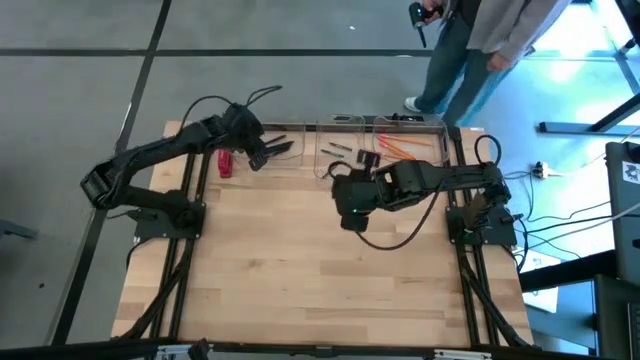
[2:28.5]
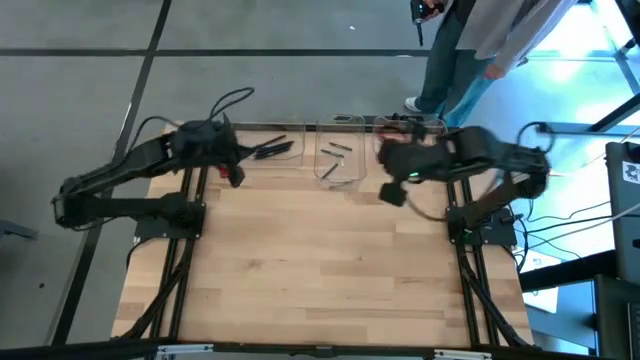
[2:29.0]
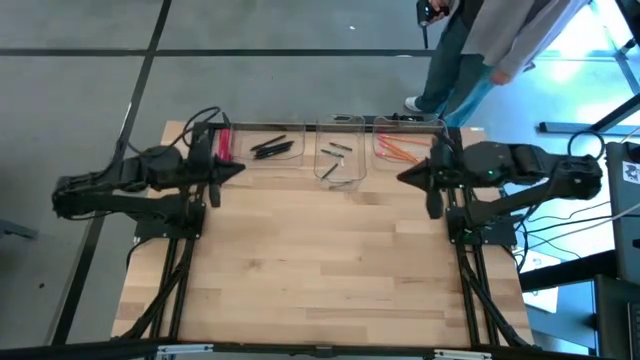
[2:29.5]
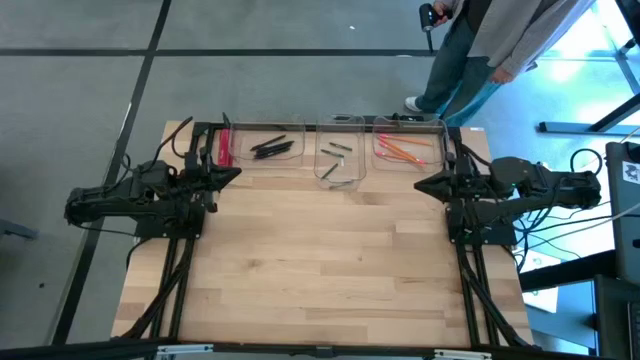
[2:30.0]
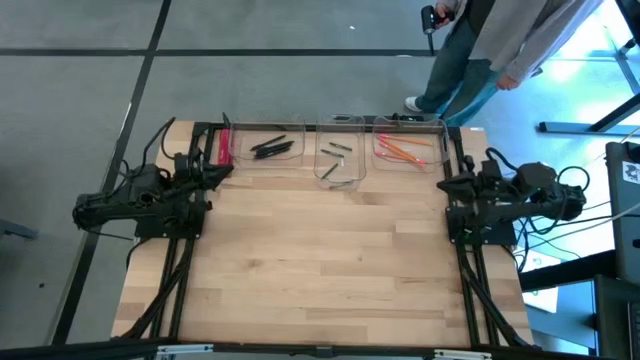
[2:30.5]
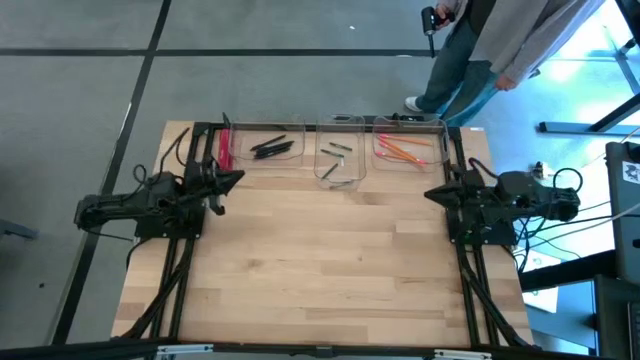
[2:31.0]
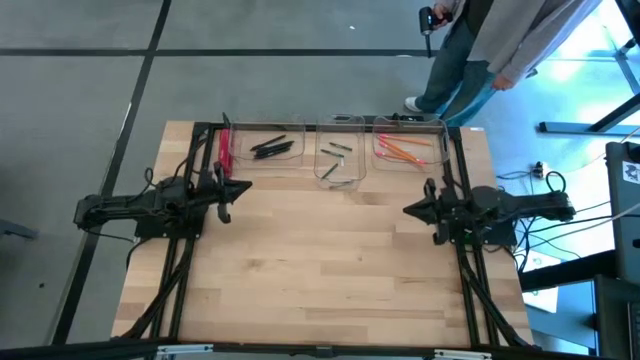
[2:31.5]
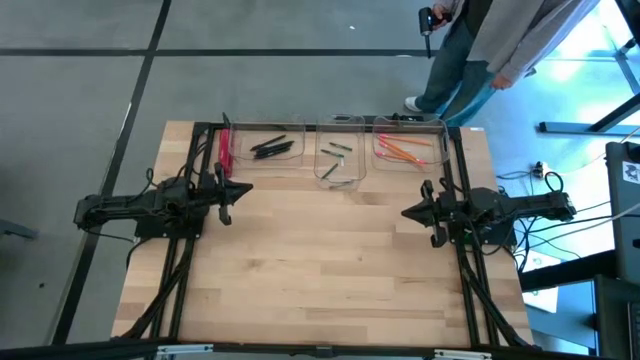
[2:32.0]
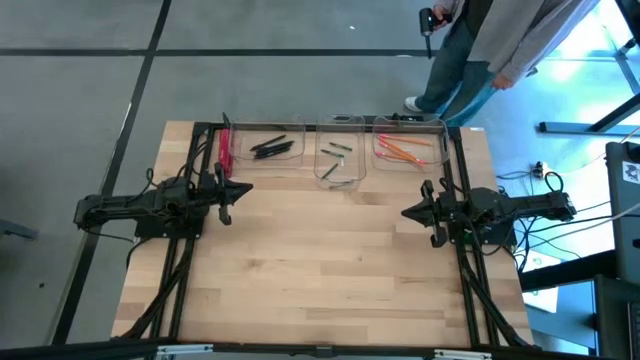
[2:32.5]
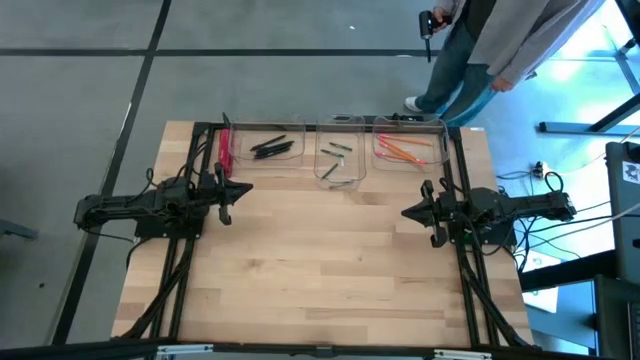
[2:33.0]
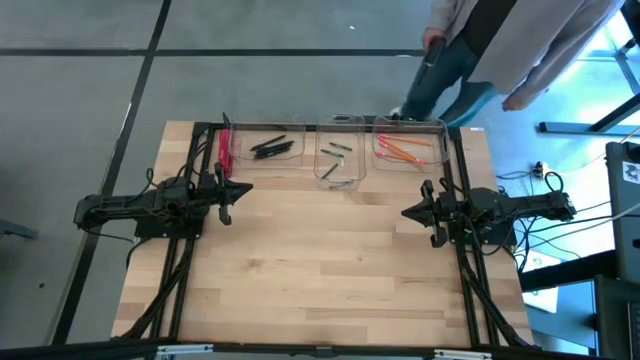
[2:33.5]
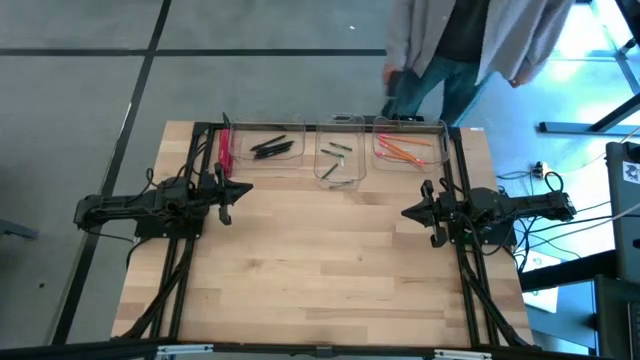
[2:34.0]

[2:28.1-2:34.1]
Task: Sort crayons/erasers/pens/pencils in bins
Return to Home Position

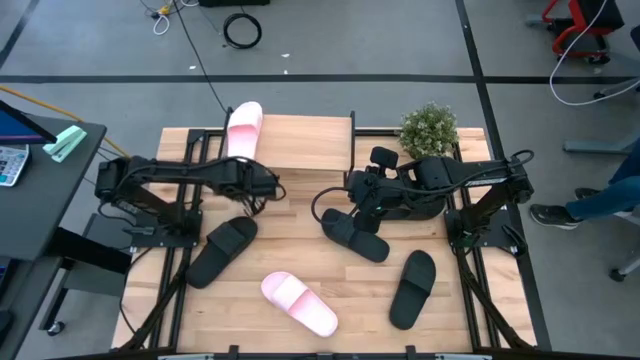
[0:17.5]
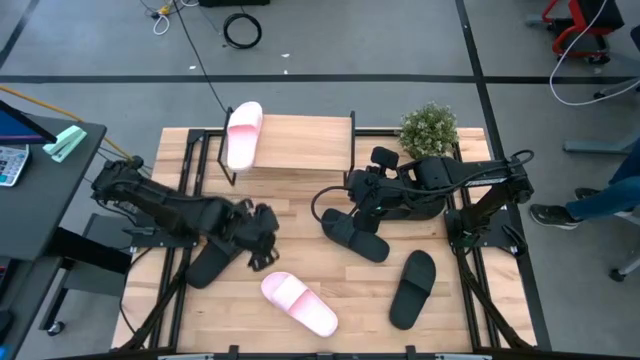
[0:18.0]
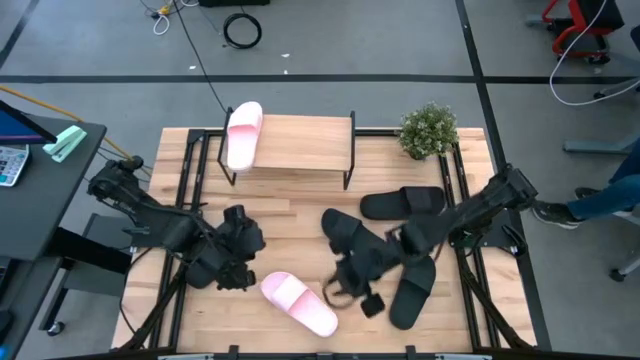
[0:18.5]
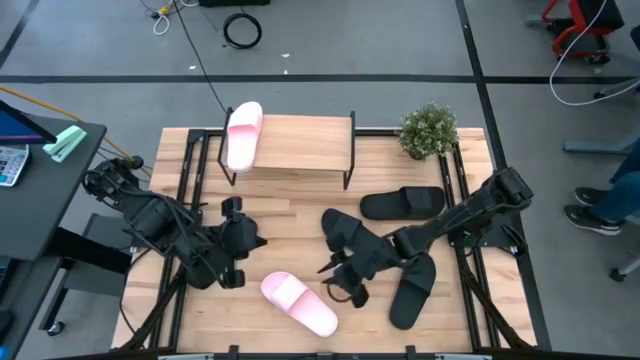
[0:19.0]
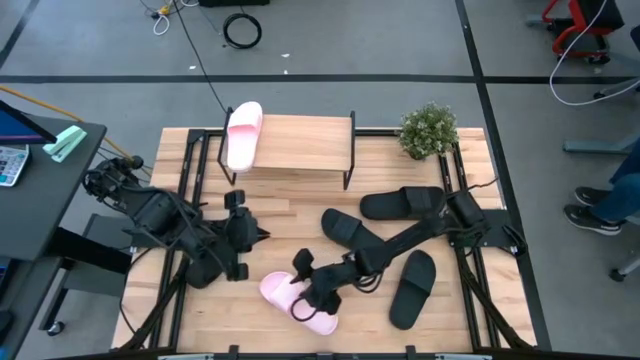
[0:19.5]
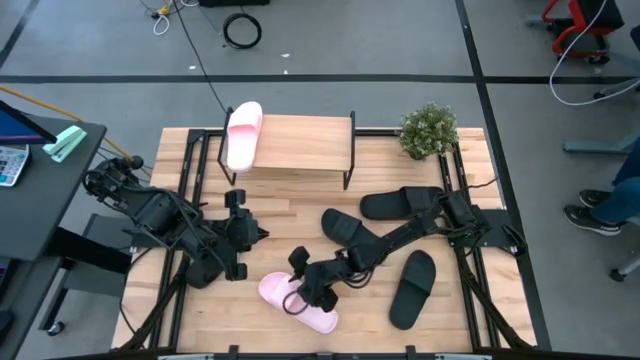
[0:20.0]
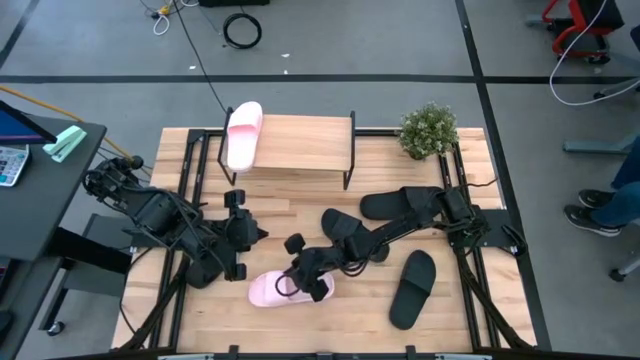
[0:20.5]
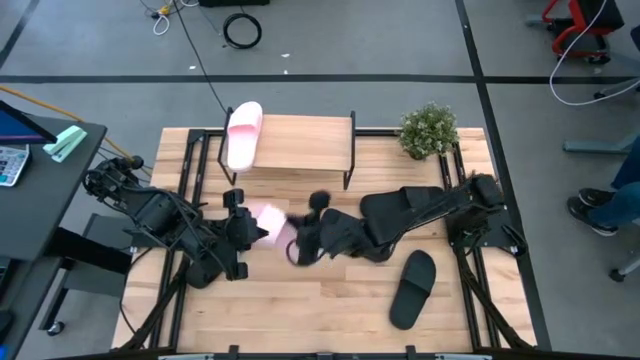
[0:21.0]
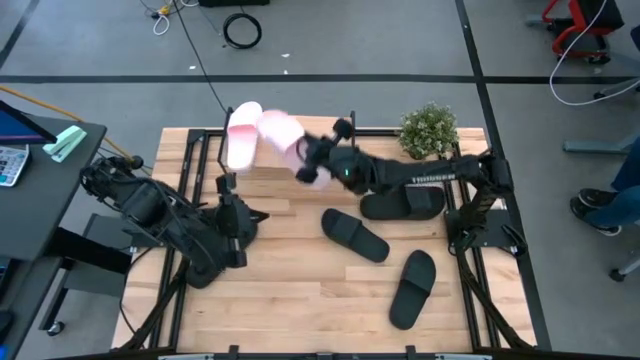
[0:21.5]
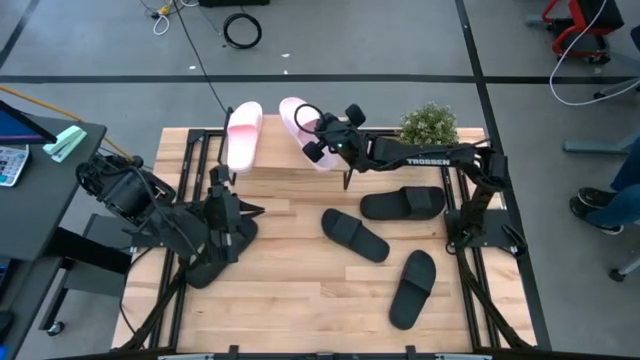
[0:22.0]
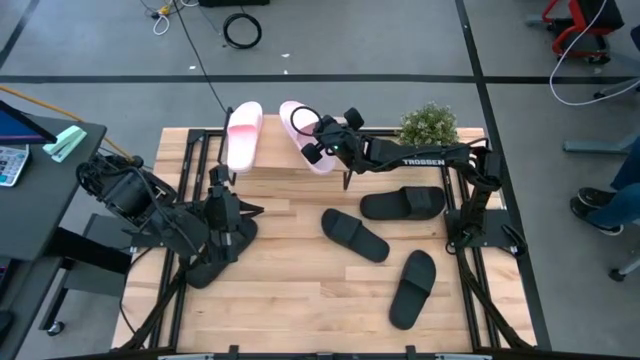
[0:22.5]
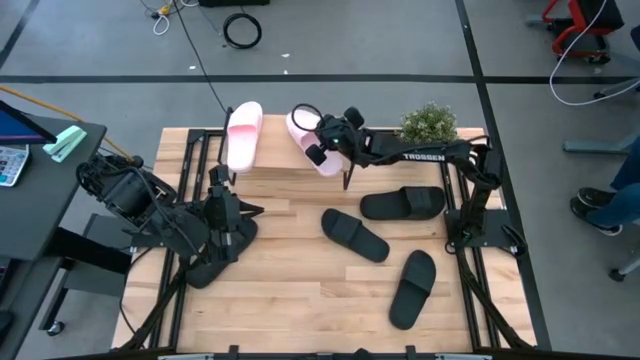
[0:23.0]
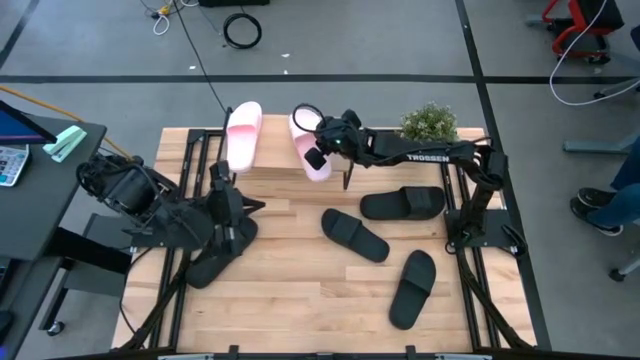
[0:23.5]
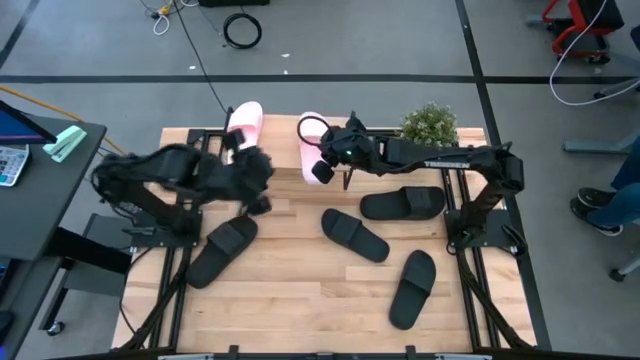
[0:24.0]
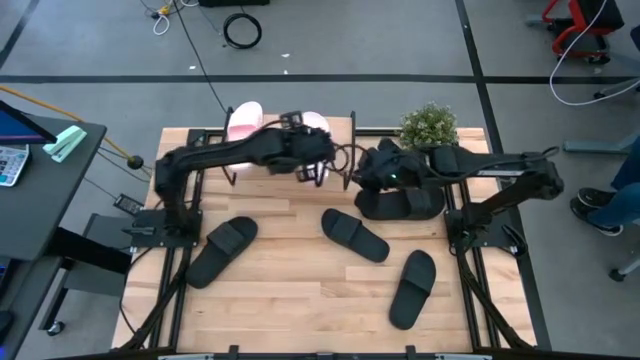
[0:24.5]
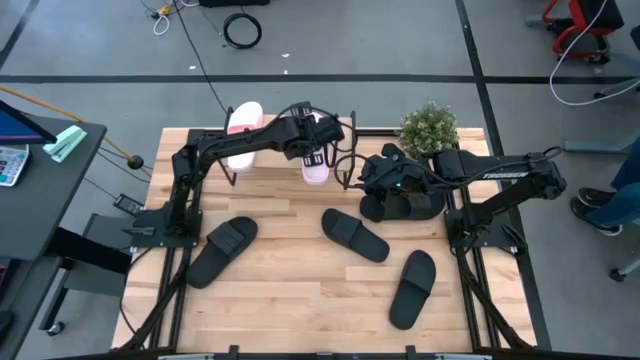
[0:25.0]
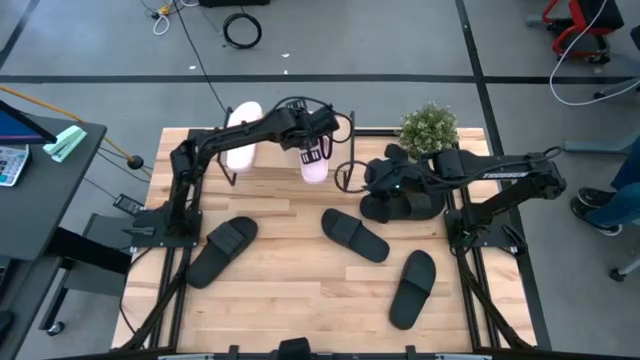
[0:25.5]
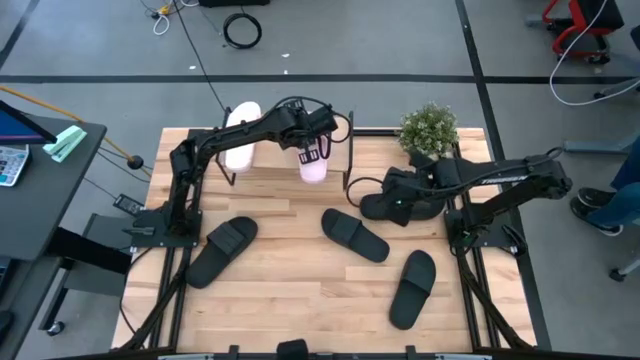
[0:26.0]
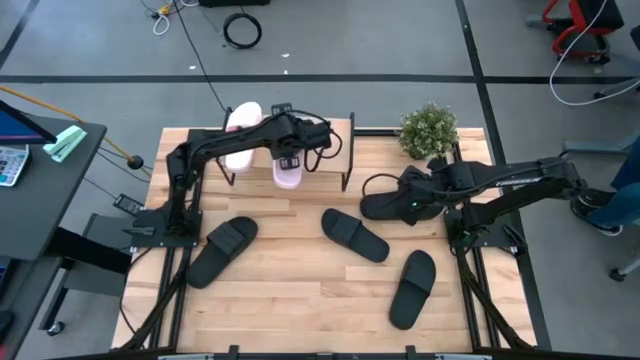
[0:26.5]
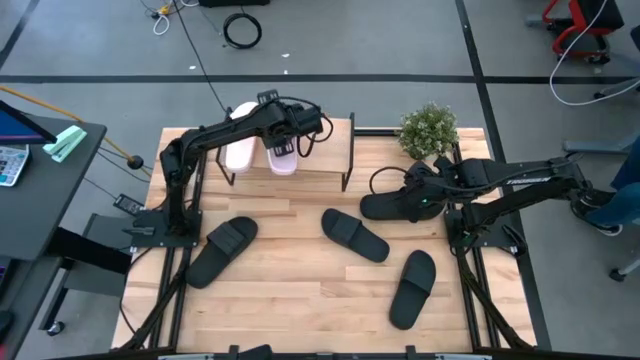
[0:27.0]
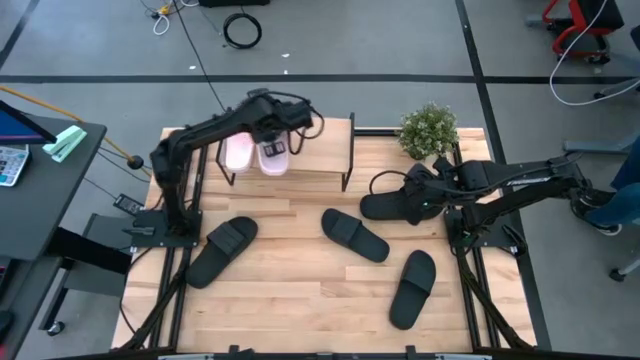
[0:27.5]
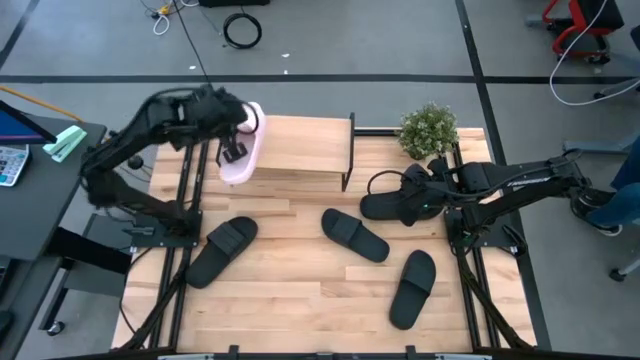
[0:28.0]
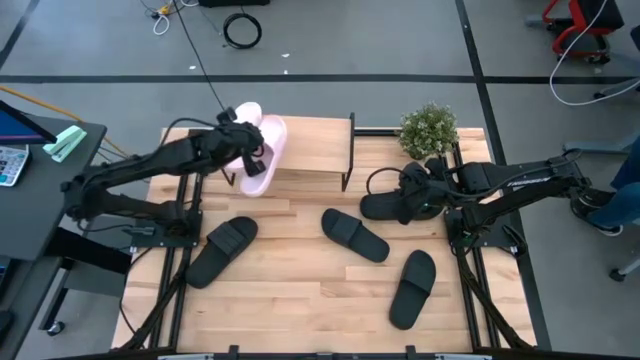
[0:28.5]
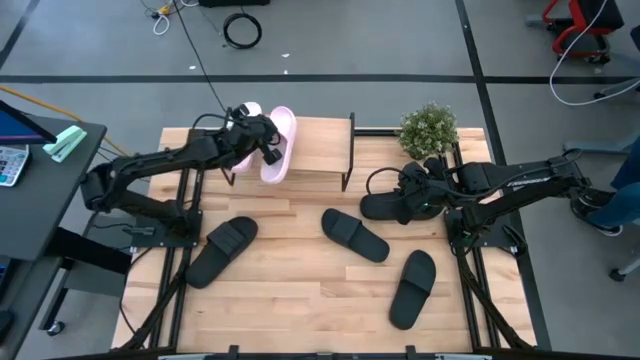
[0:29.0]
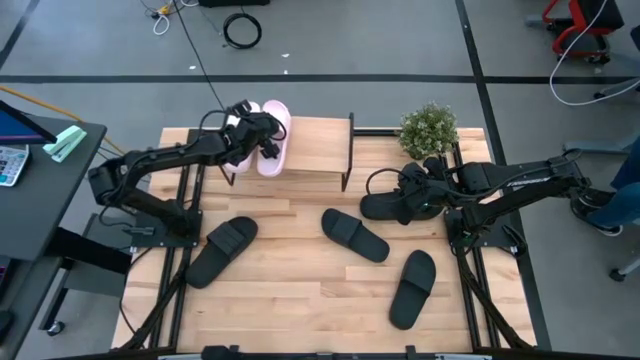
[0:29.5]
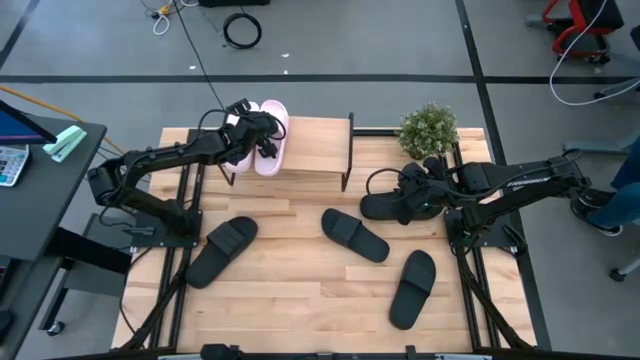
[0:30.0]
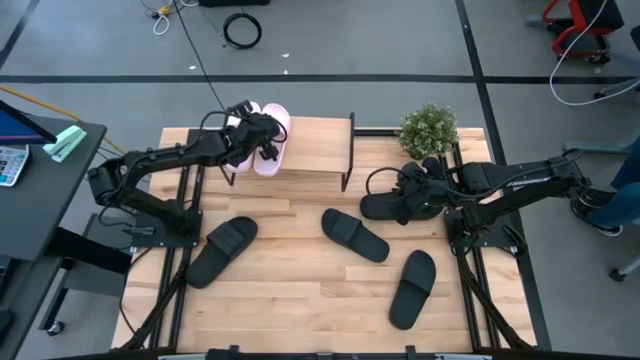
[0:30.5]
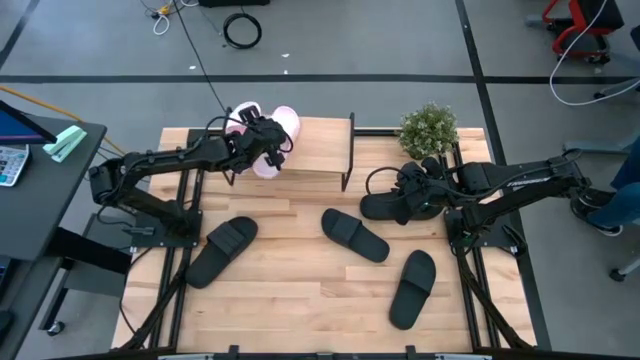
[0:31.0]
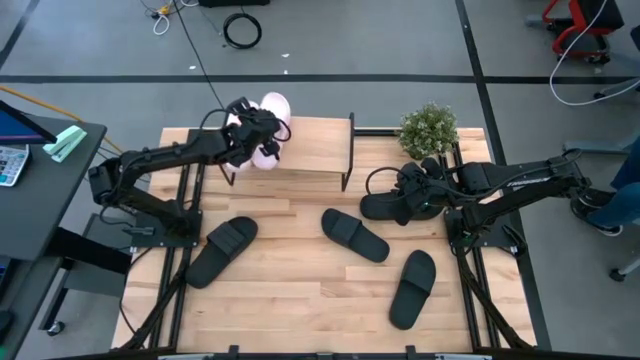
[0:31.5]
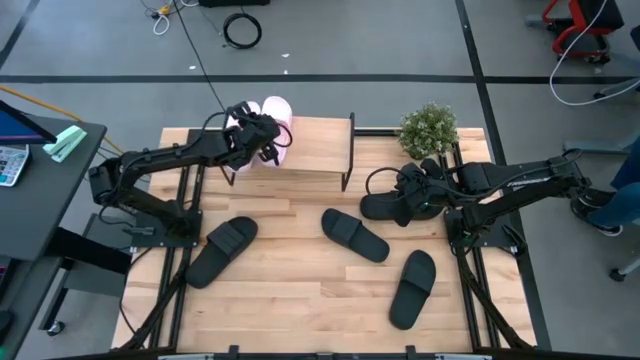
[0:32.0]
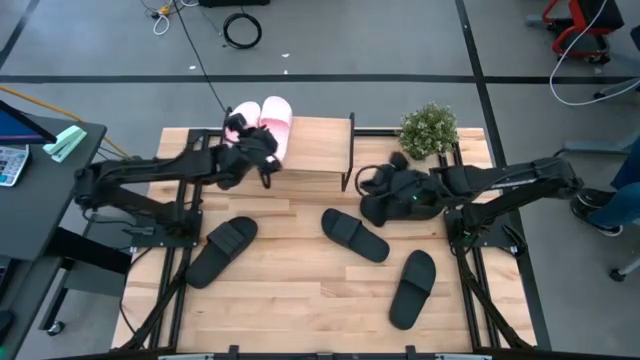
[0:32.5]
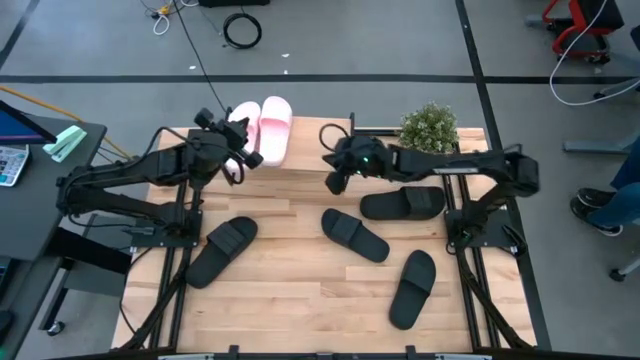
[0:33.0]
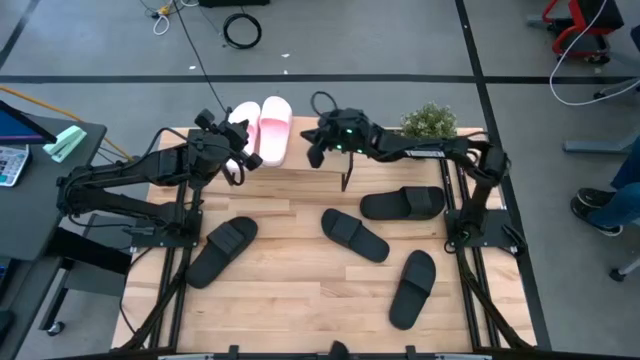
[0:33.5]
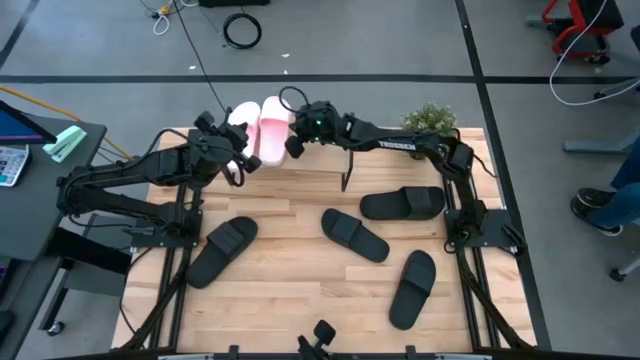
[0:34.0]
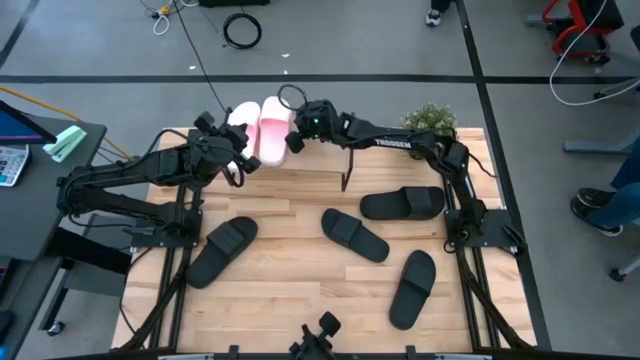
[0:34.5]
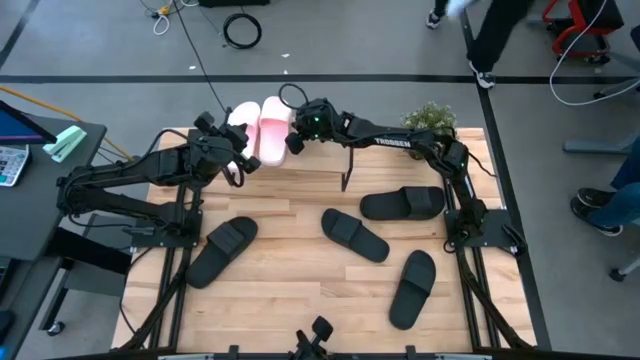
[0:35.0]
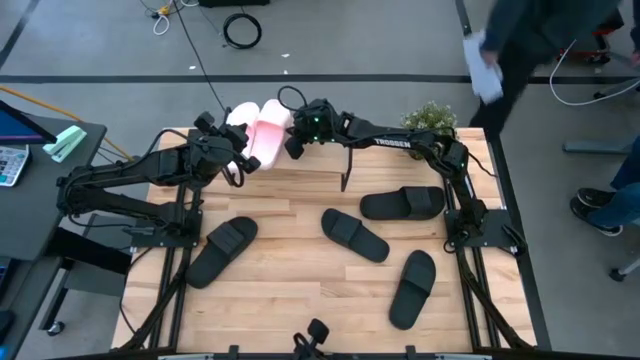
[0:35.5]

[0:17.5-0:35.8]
Task: Pick and place slides into the shelf
Put the pink slide on the shelf
